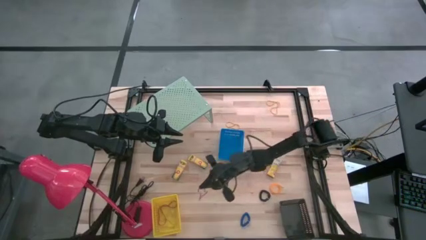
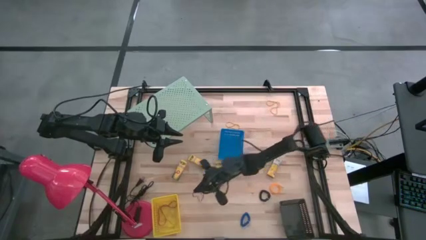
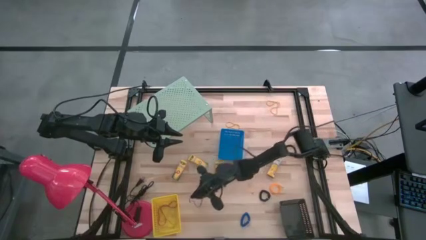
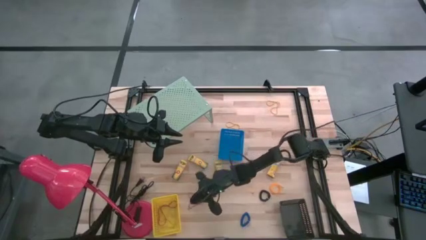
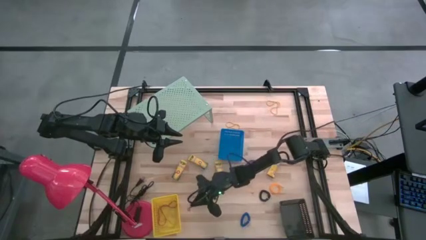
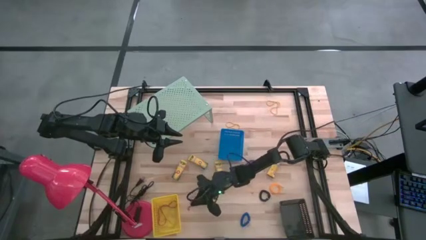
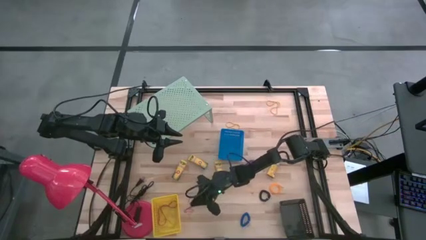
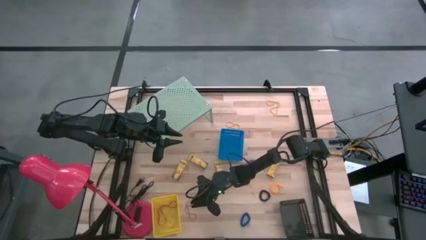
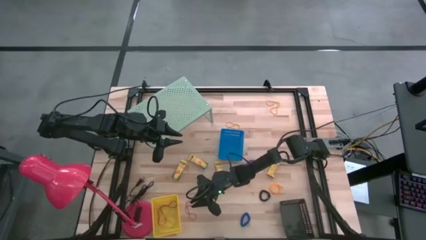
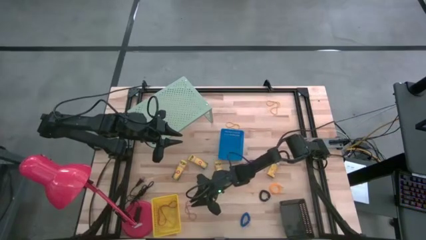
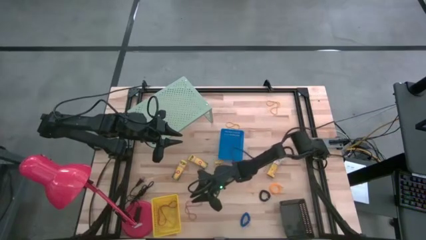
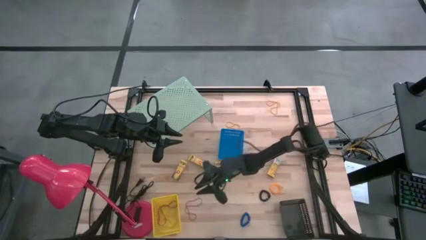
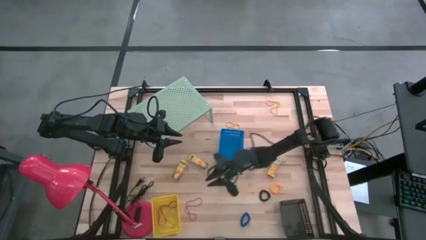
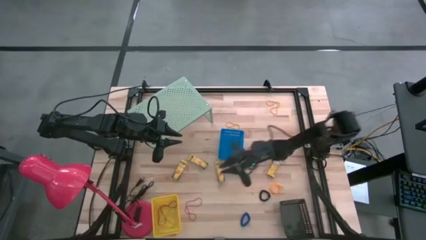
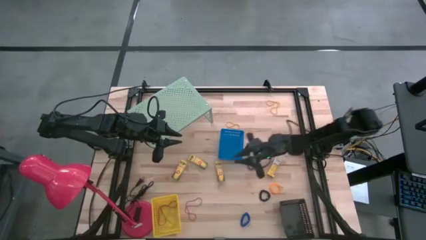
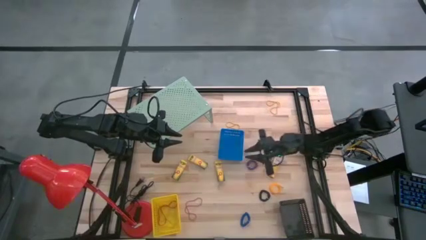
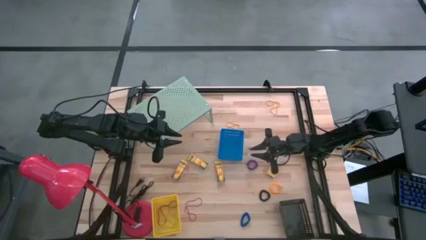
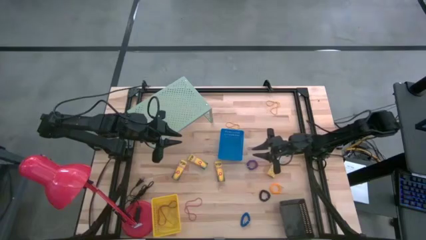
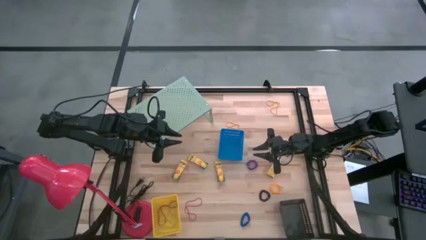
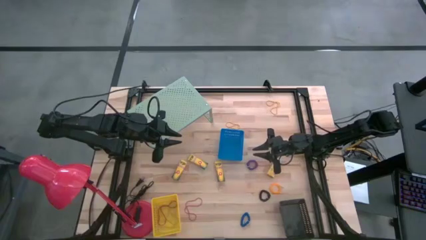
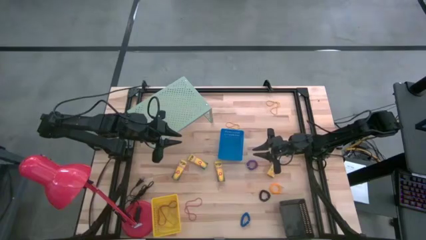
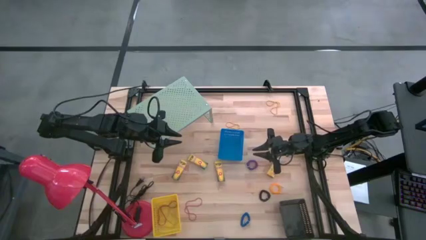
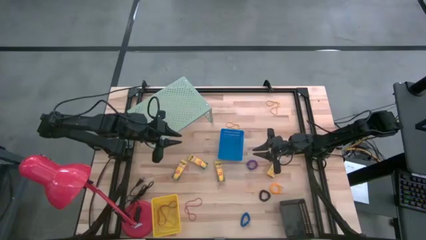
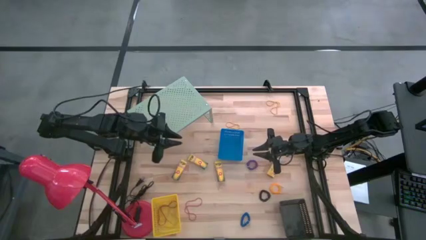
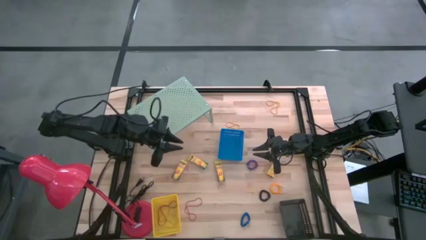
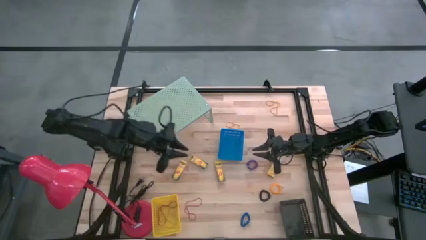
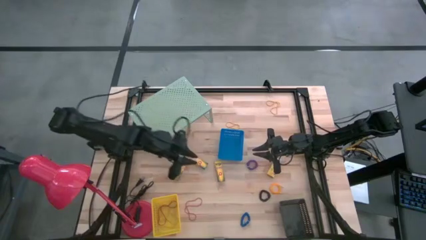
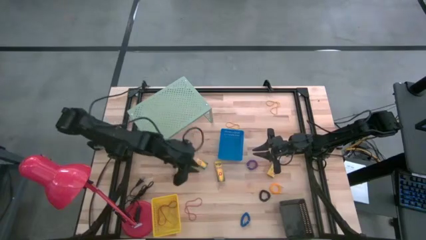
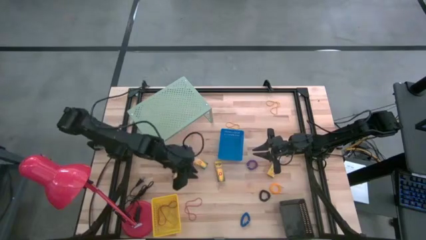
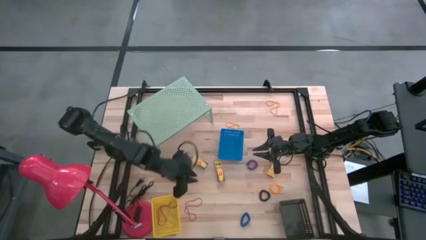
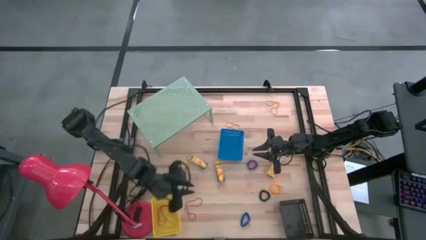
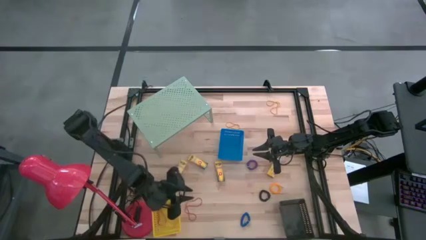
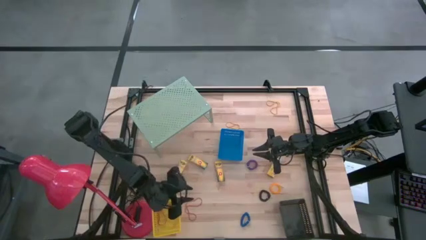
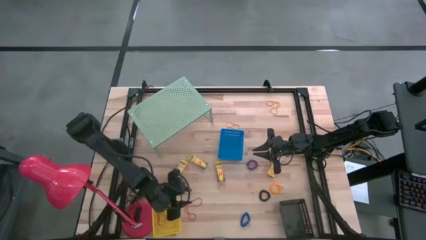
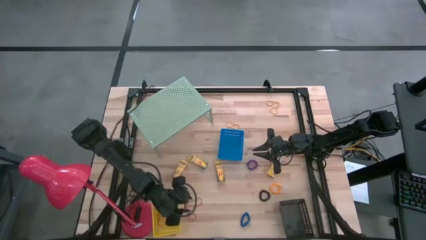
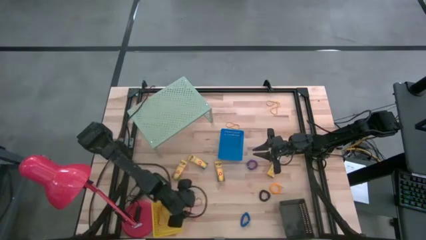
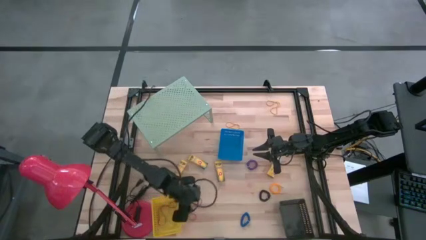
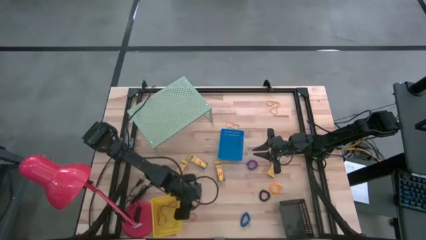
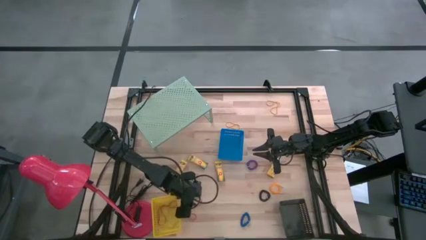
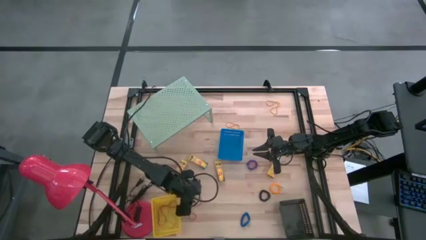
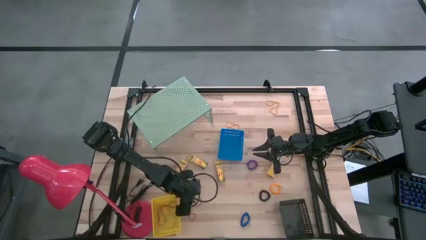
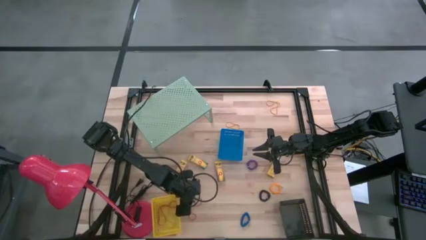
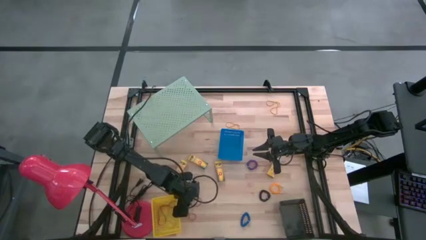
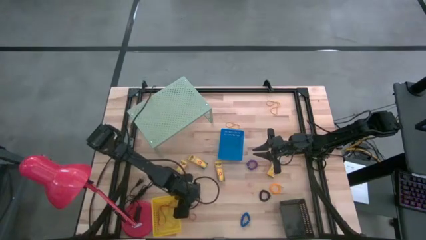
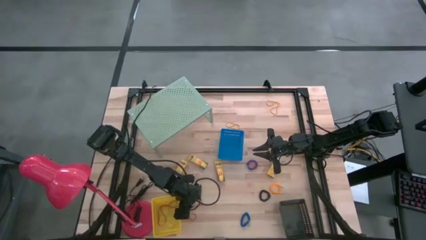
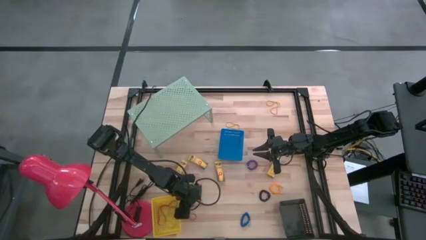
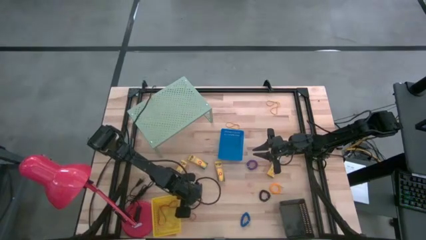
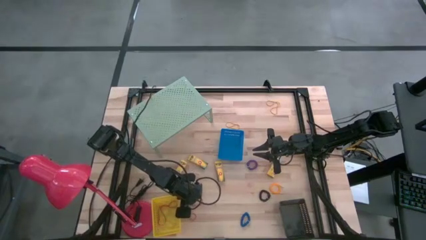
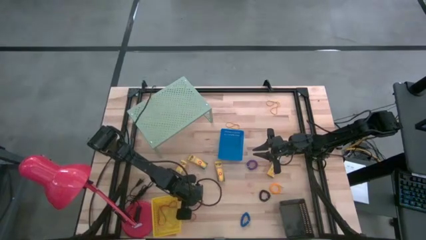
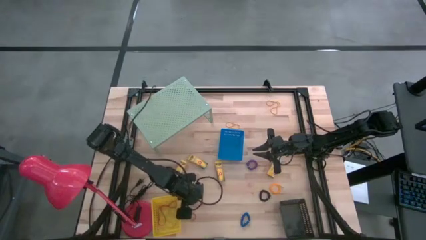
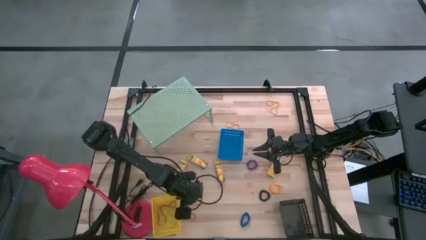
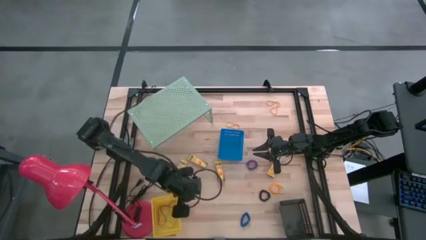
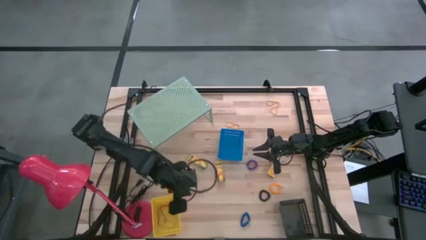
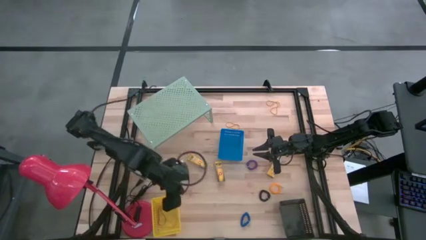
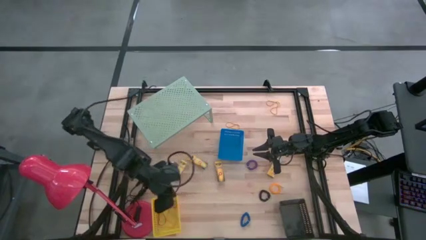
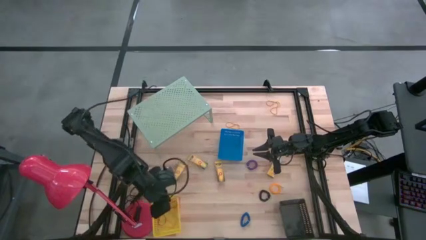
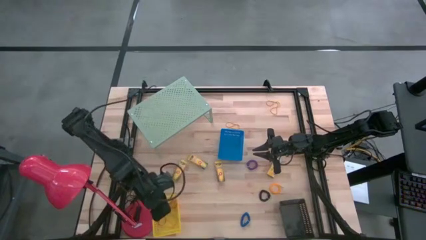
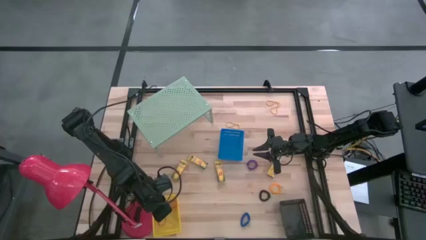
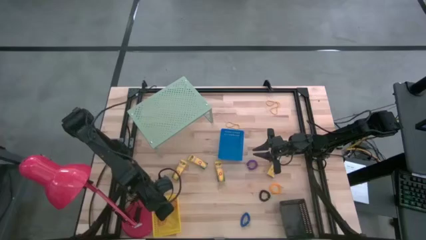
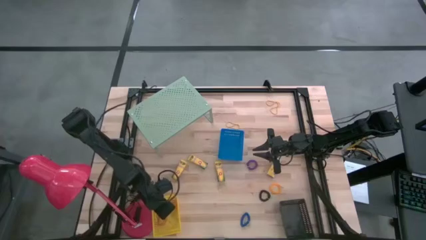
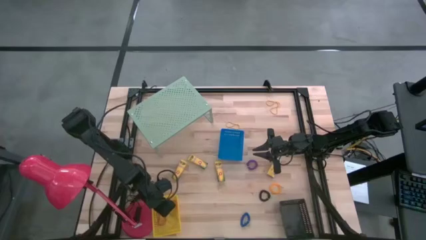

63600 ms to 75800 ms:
Task: Pick & Place Office Desk Supplies
Put the bottom red rubber band into the yellow basket

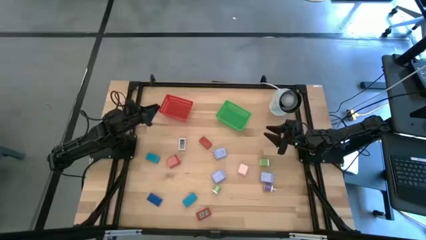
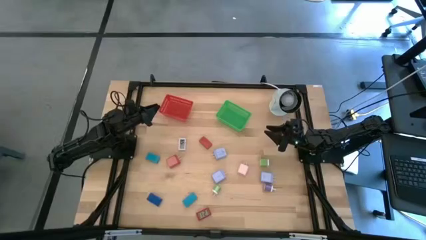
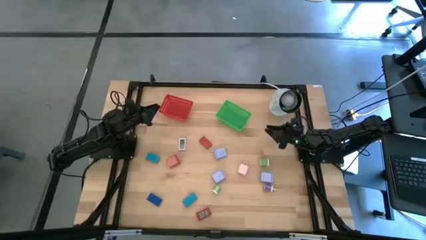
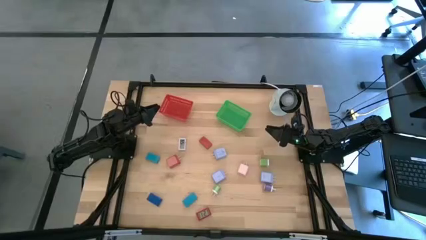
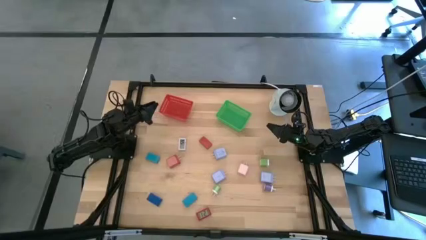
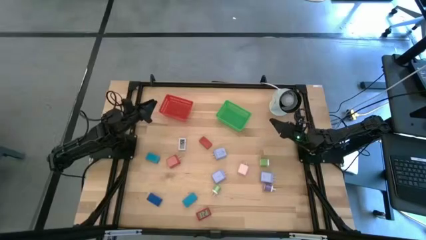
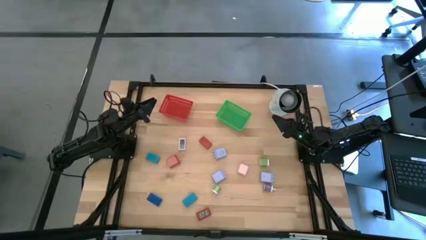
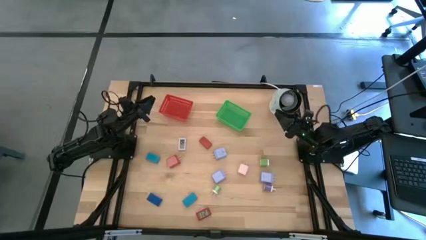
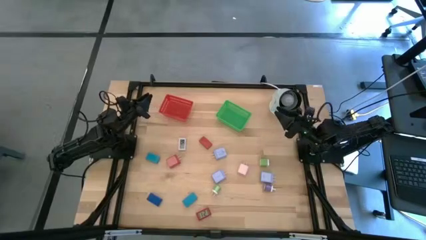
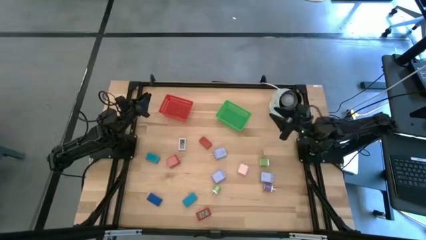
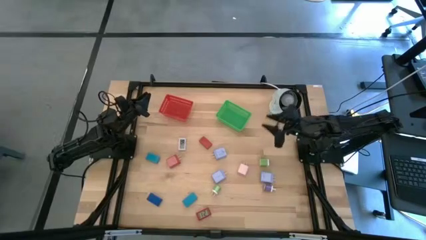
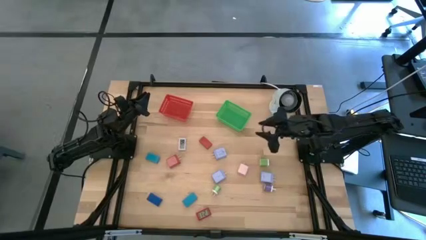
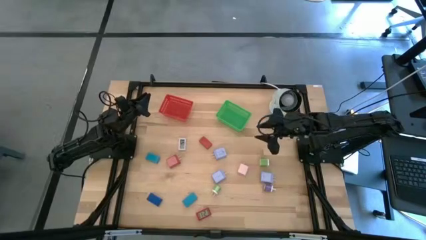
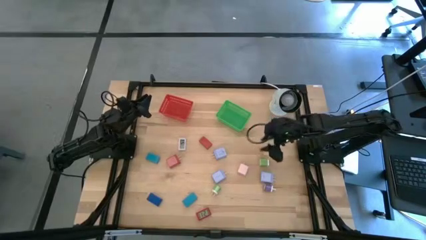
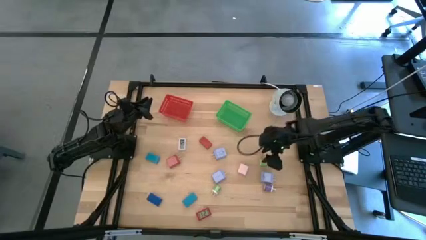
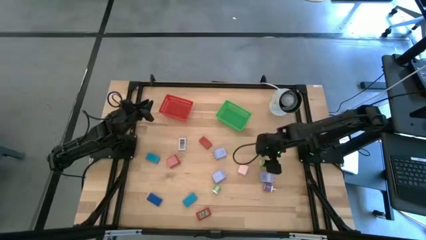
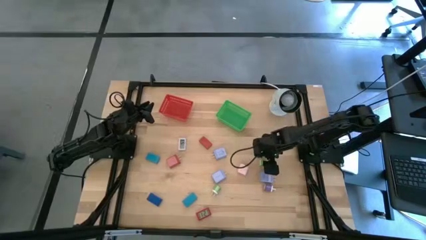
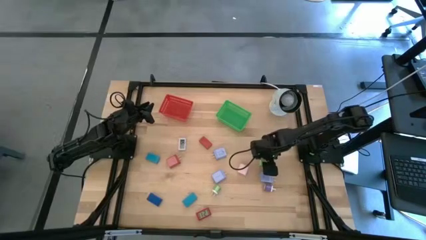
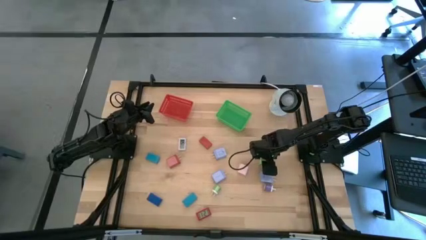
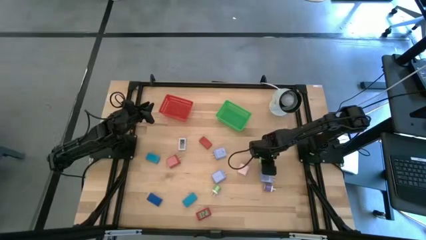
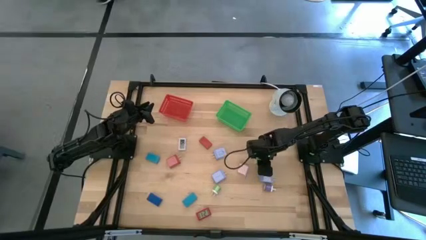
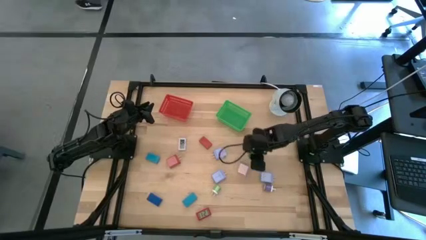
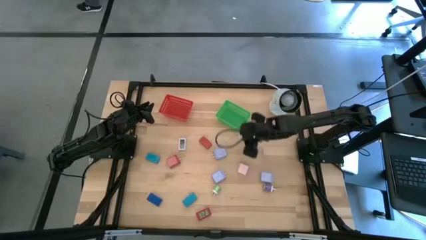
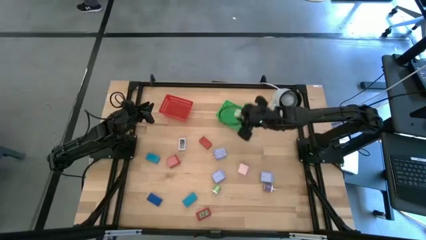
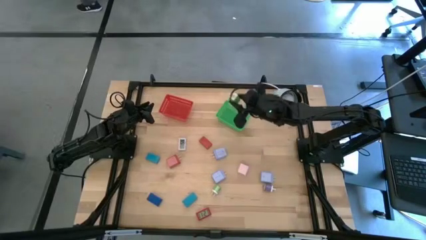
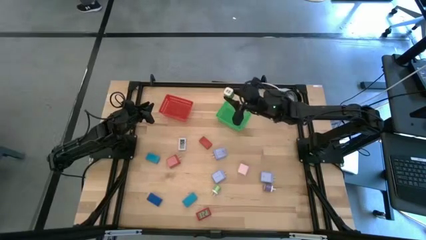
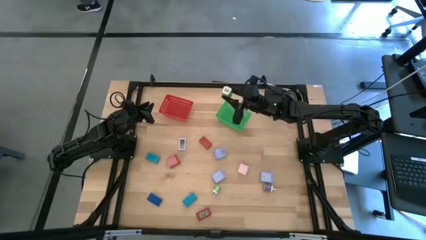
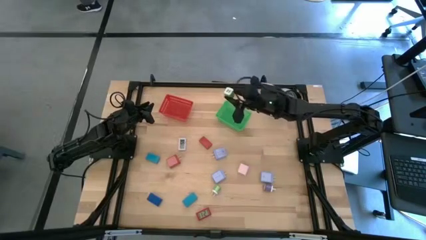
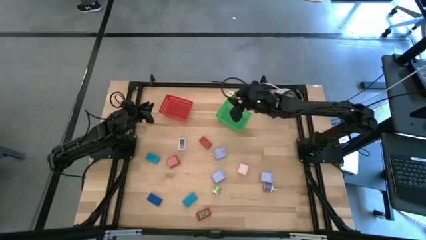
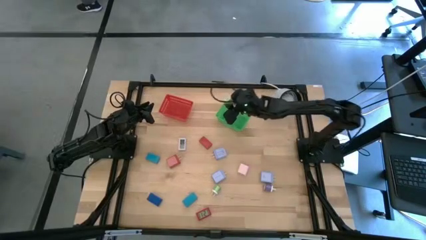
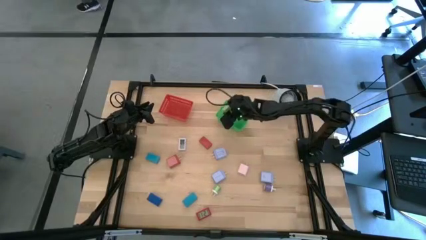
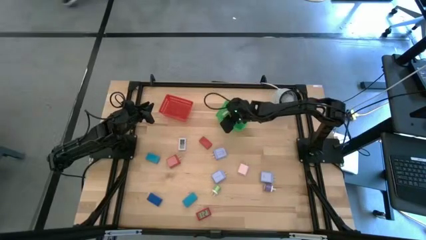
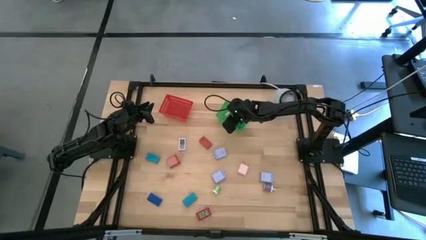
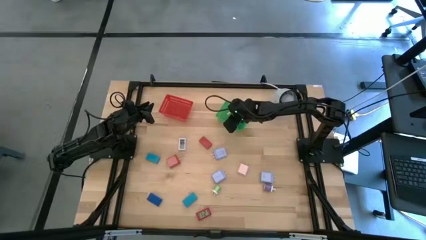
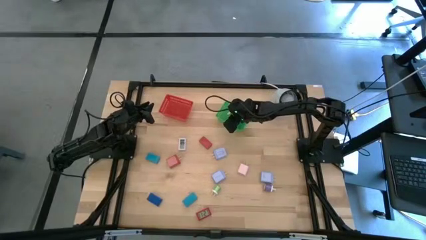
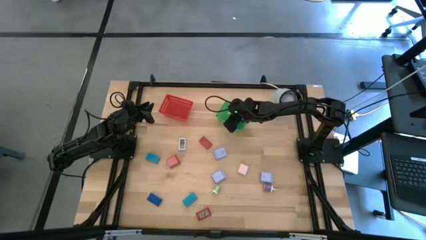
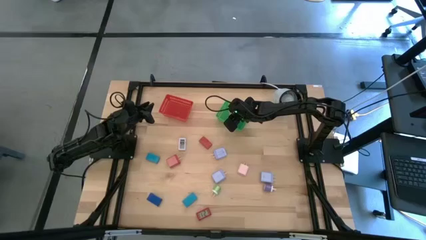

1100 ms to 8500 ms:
Task: Pick & Place Office items
Put the right green charger adapter into the green bin
